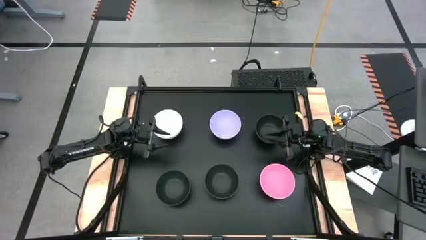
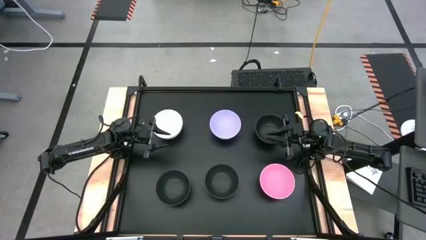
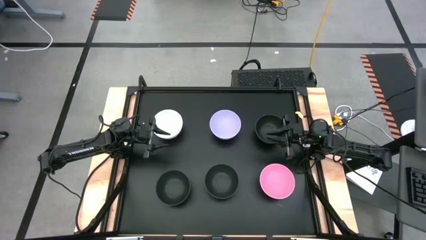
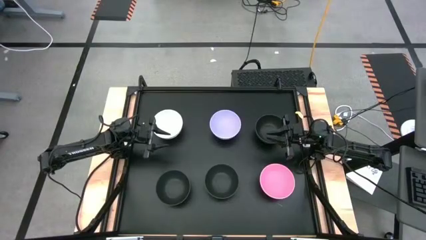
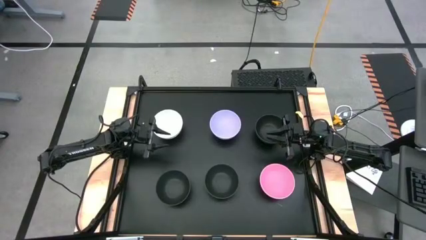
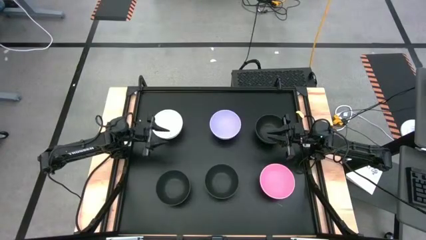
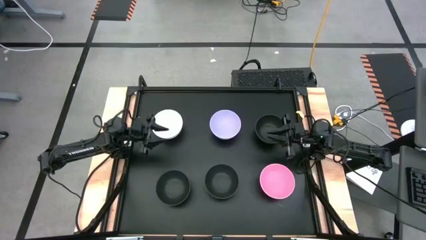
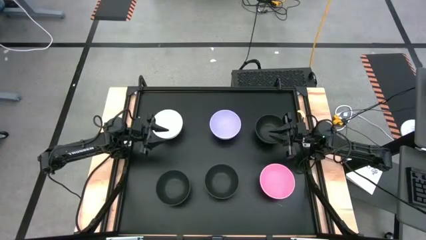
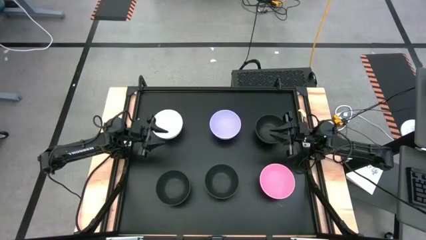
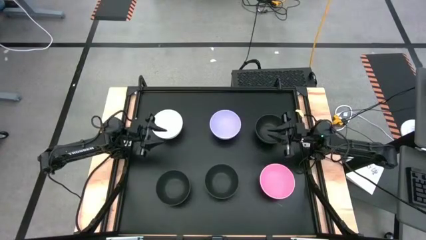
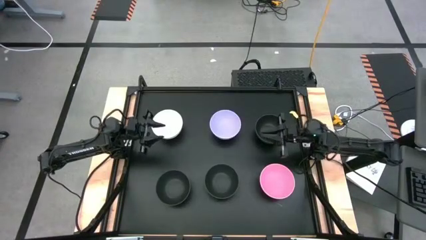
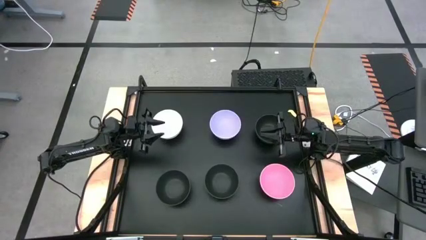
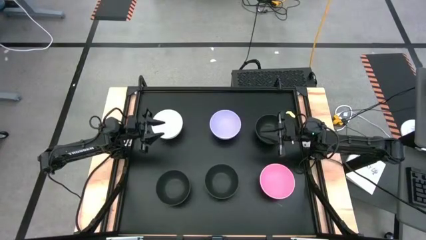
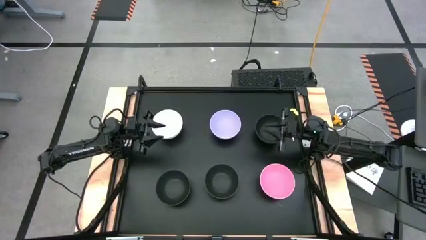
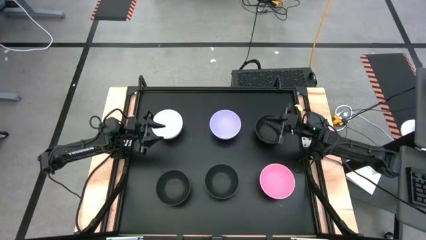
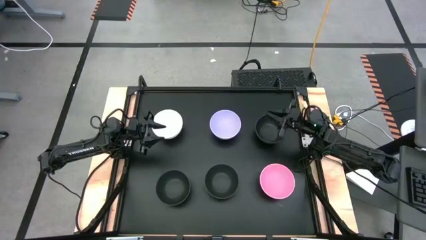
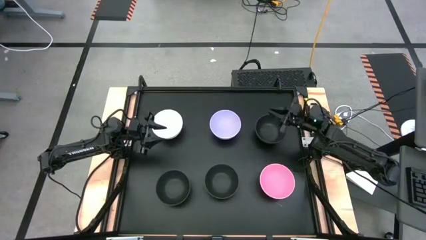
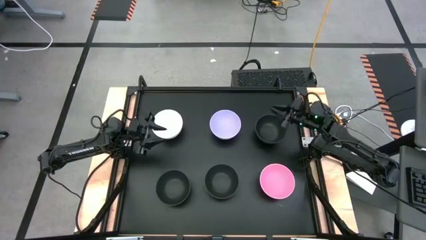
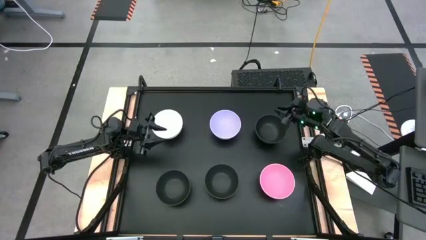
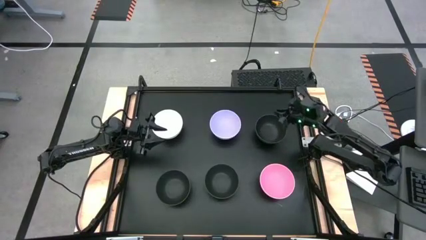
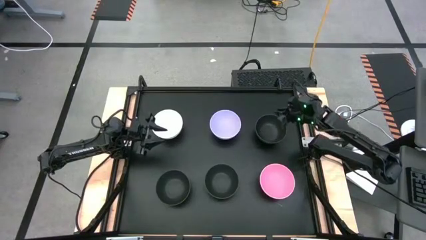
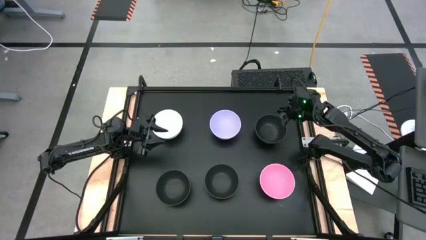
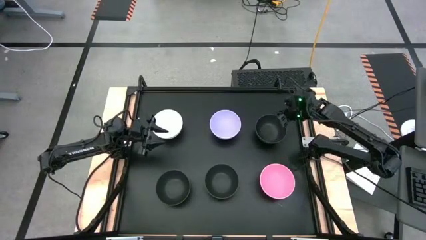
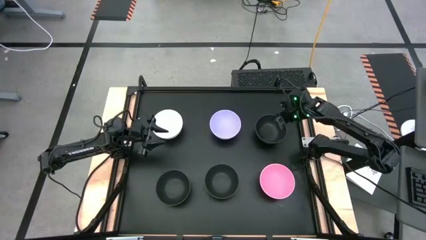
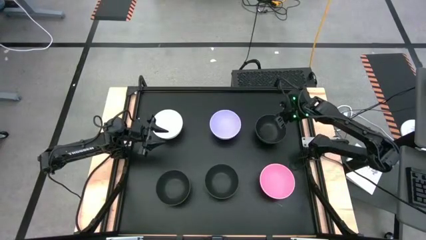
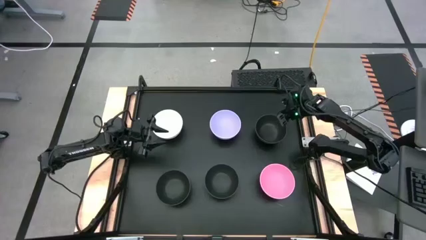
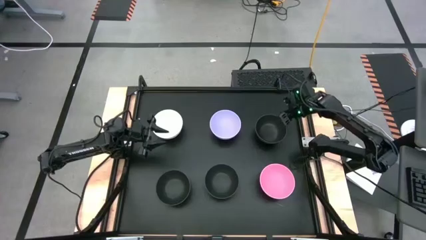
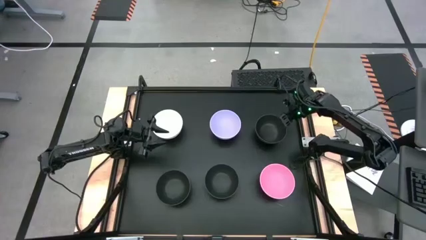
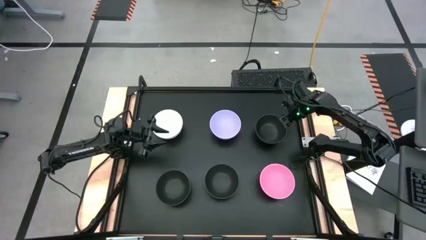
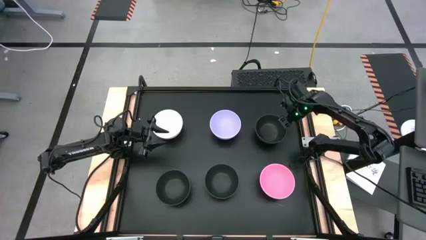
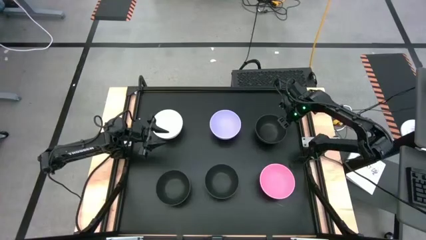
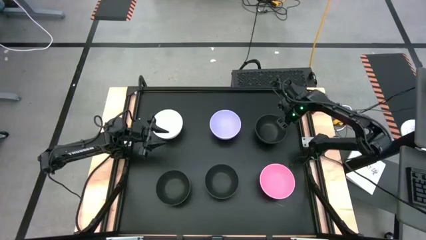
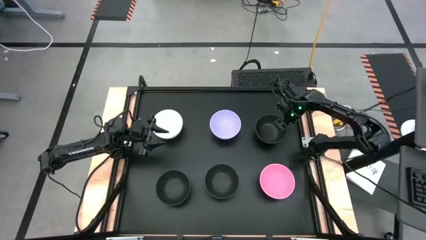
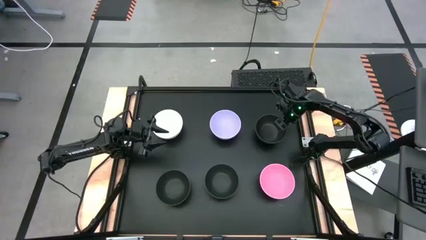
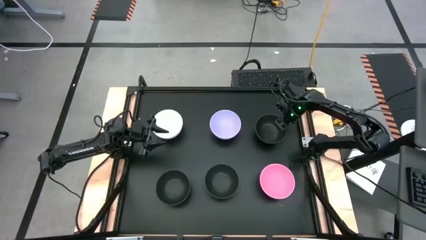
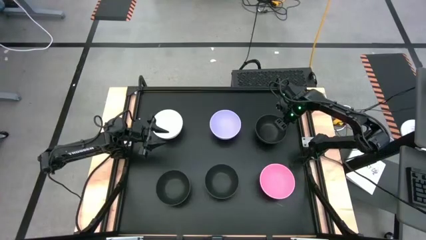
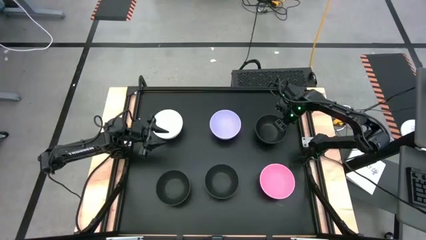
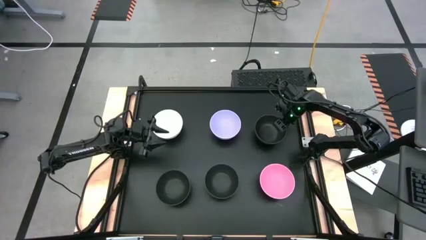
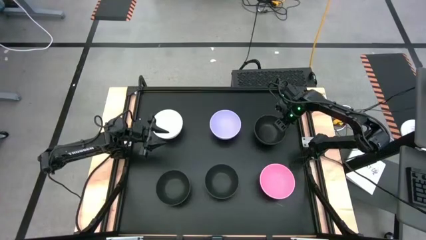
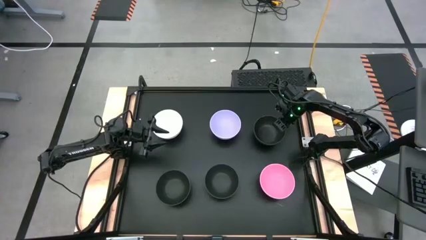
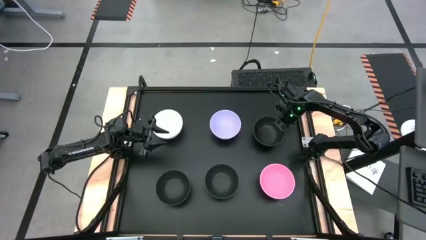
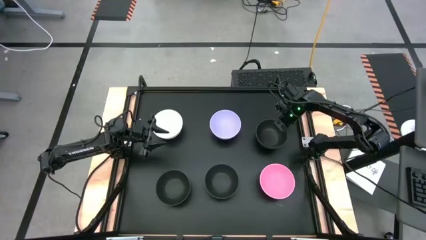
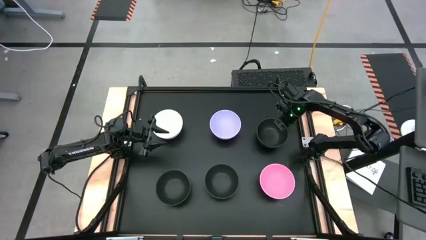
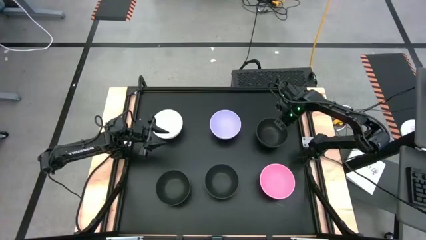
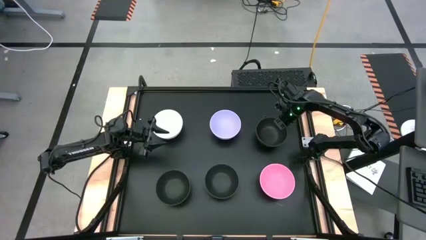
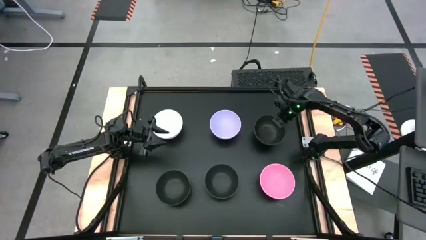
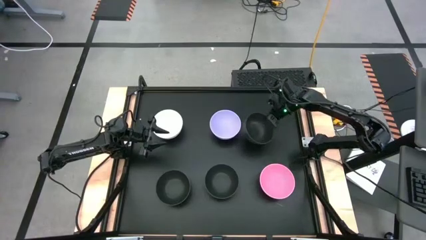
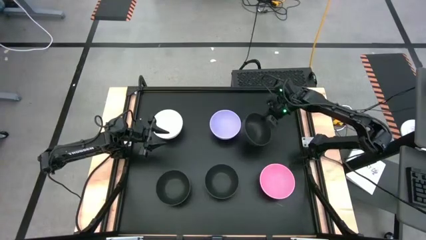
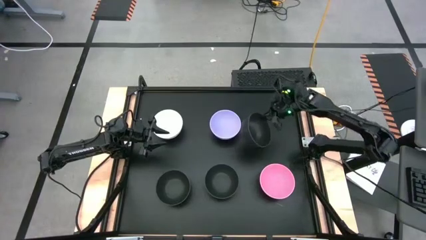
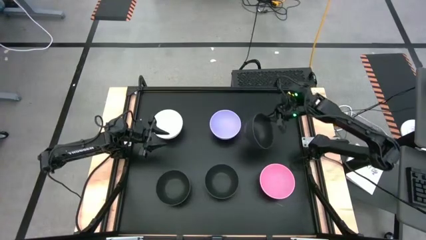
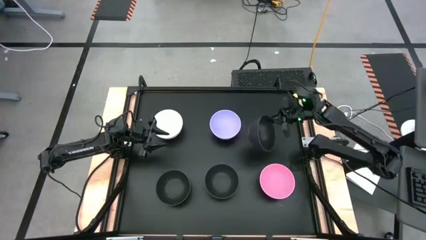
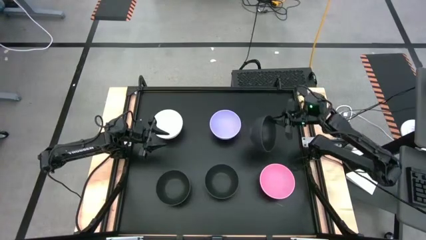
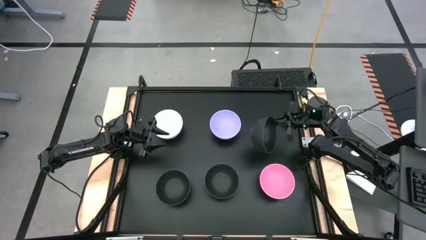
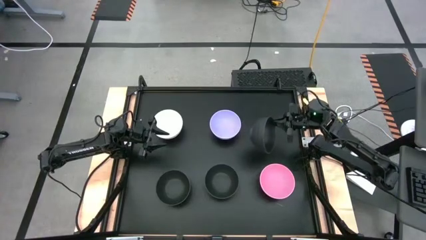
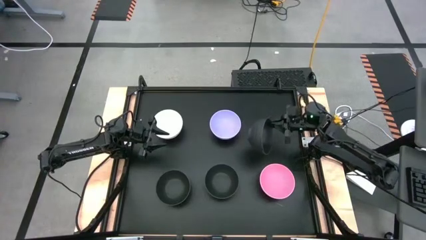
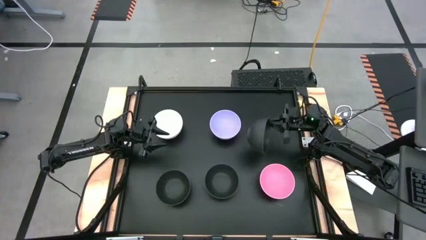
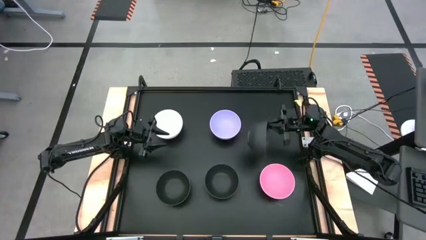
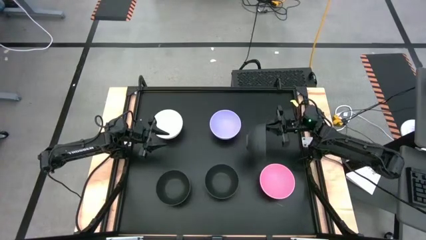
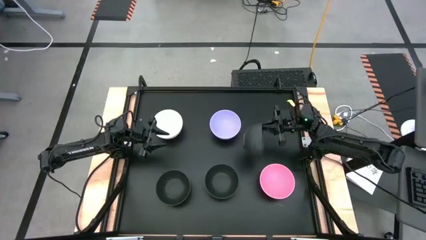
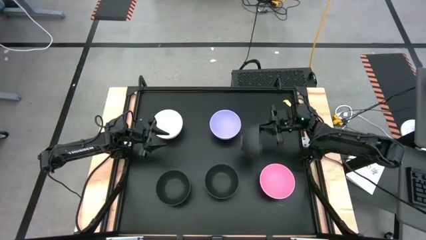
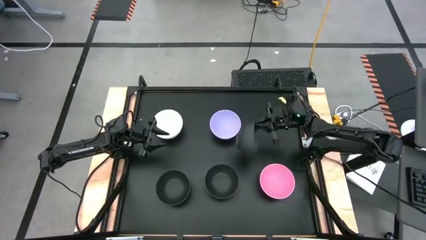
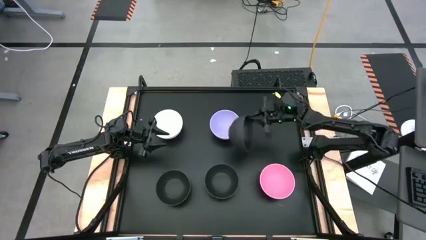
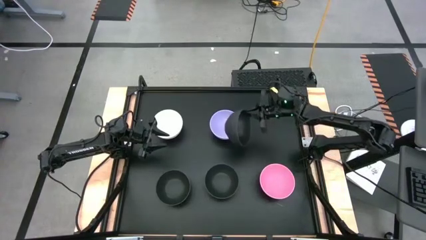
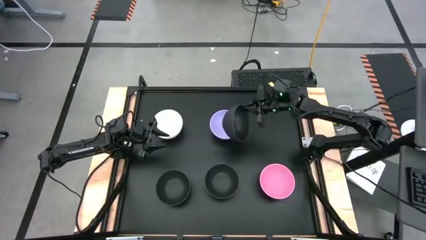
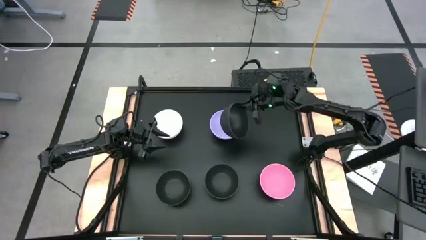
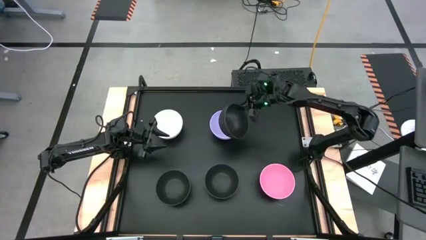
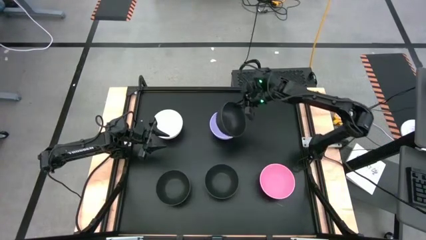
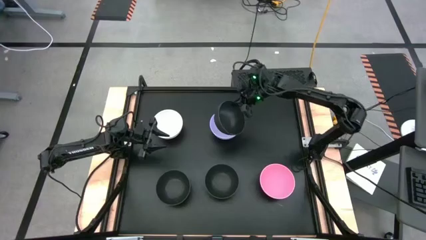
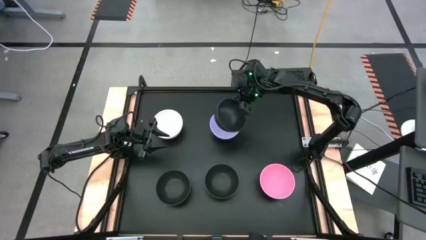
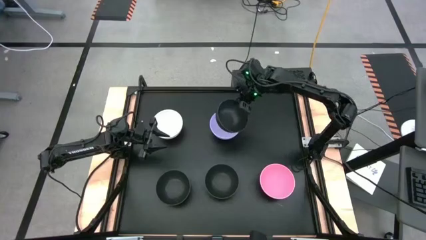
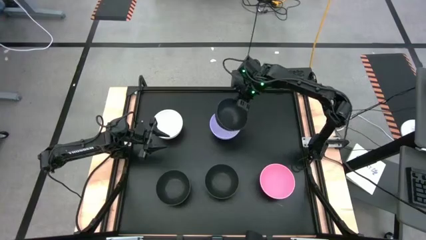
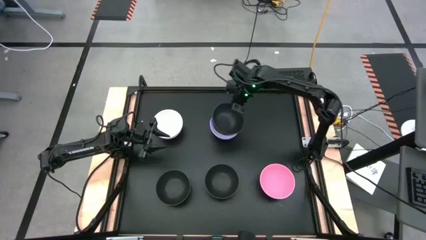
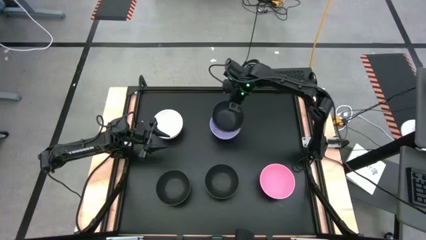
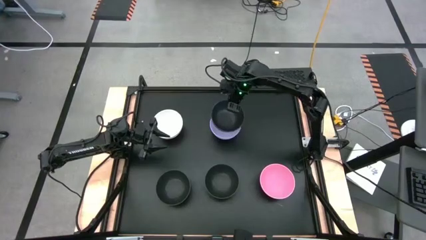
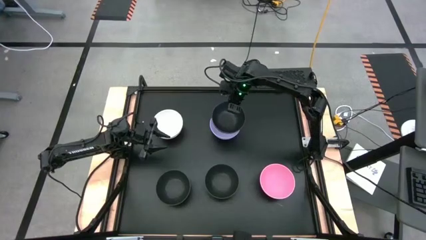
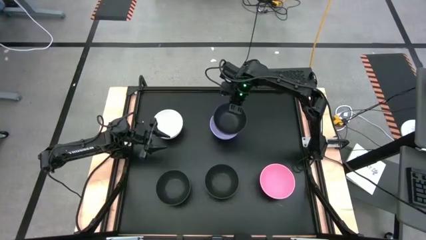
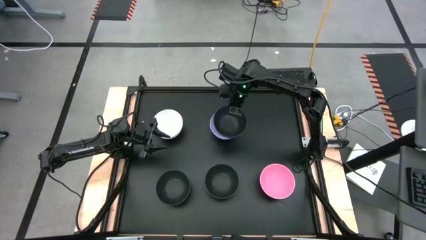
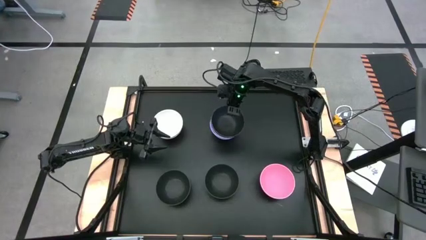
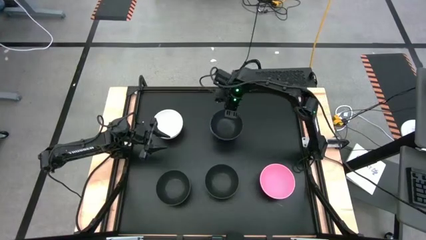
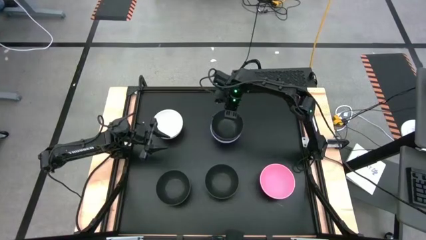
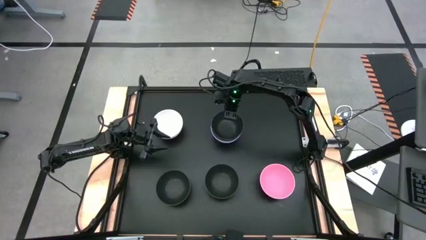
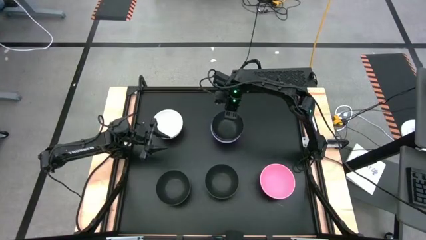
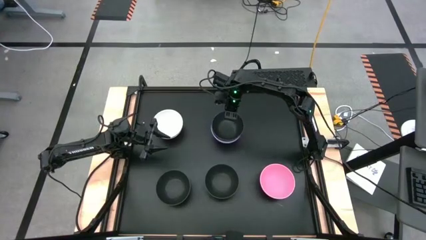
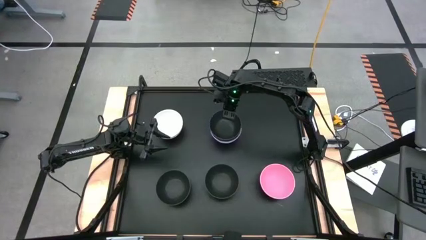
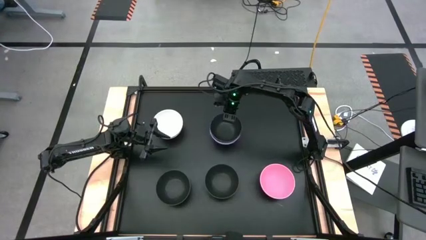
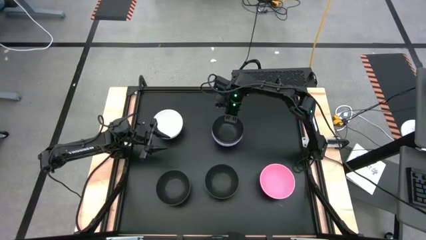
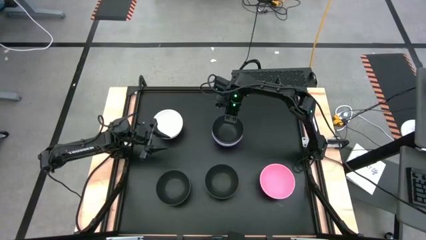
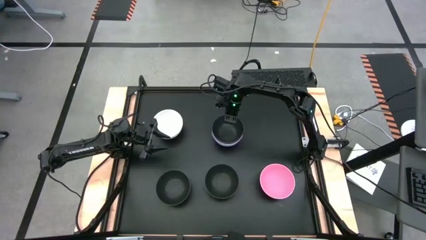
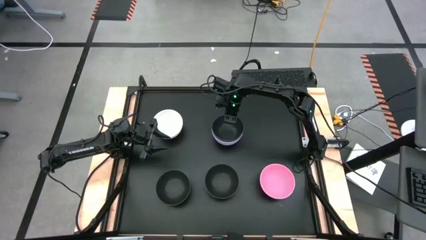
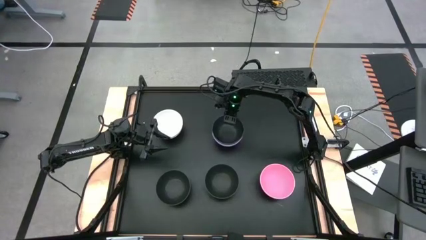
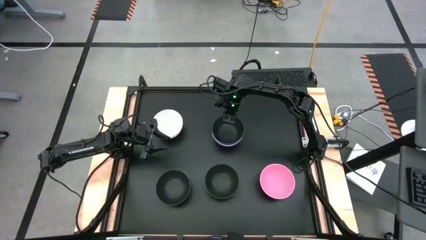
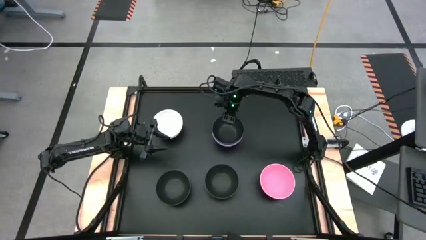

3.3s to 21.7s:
Task: Nest bowls inside each other
Stack the top right black bowl on top of the purple bowl
